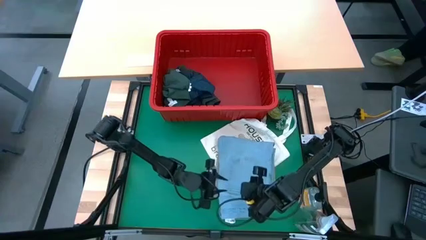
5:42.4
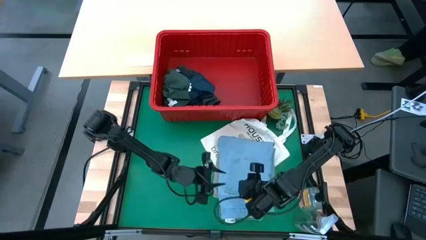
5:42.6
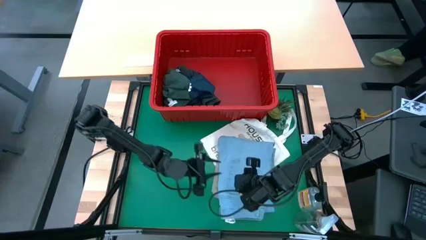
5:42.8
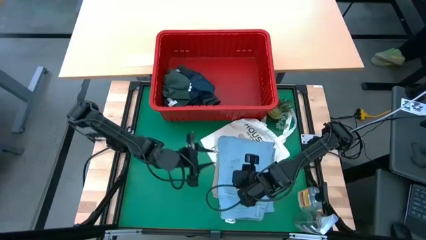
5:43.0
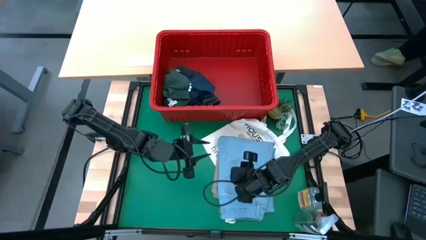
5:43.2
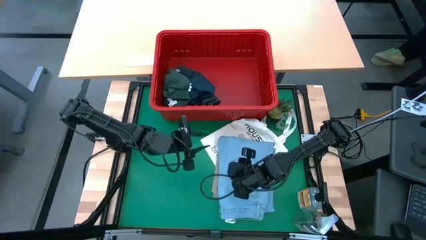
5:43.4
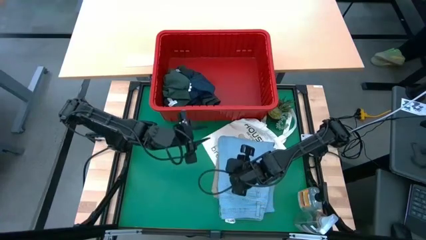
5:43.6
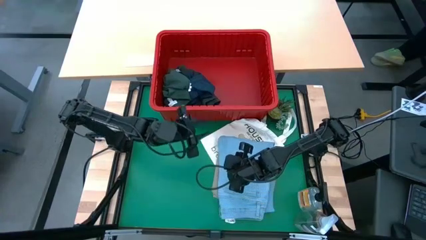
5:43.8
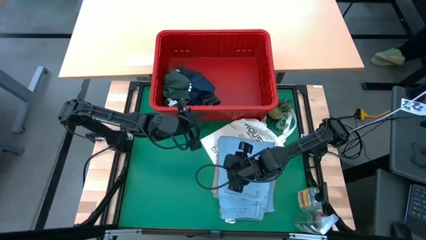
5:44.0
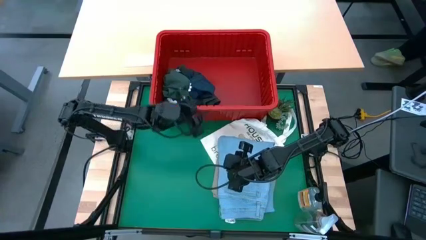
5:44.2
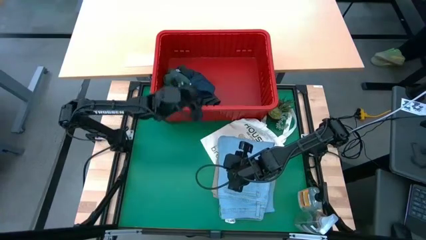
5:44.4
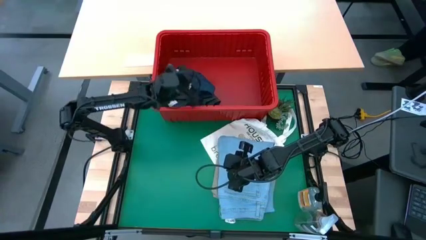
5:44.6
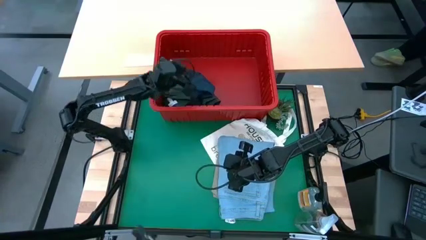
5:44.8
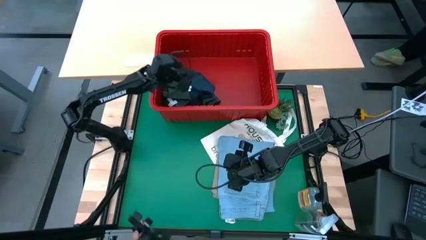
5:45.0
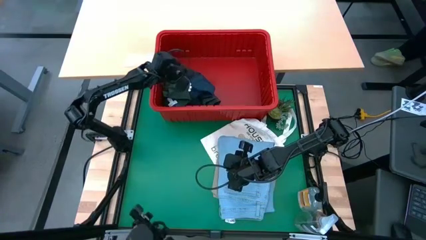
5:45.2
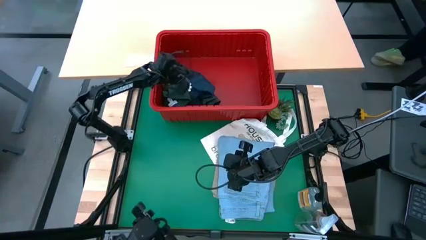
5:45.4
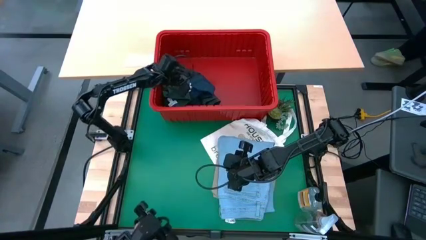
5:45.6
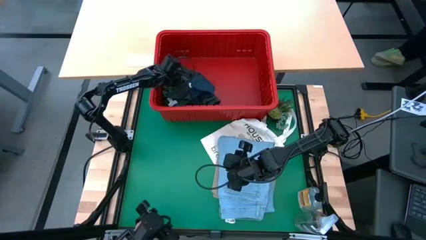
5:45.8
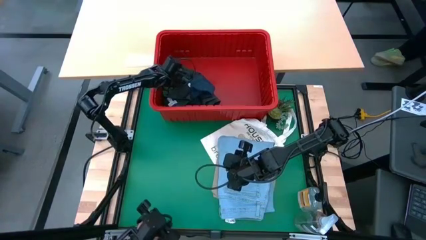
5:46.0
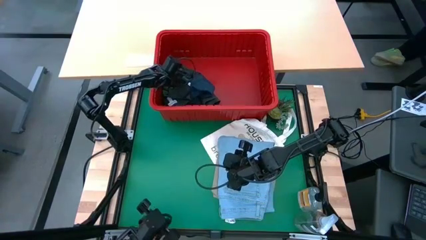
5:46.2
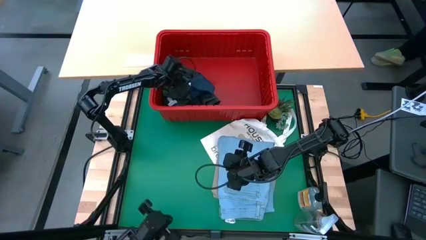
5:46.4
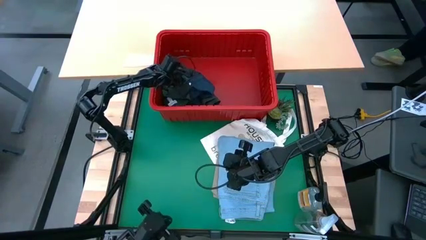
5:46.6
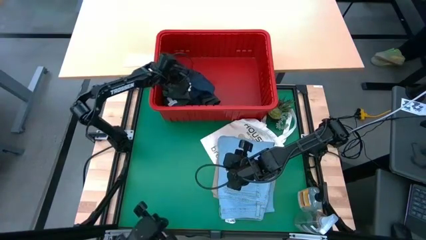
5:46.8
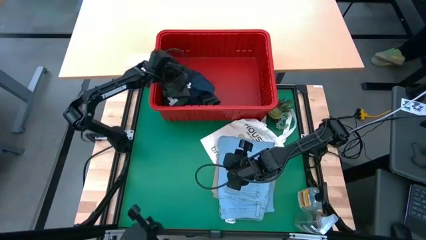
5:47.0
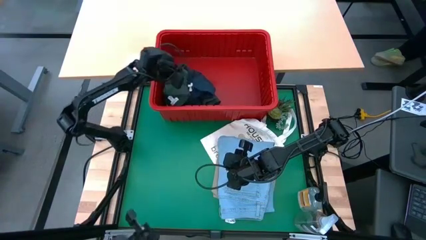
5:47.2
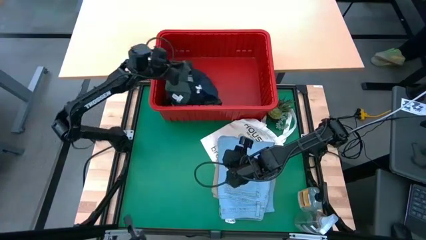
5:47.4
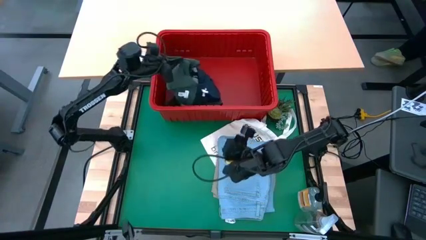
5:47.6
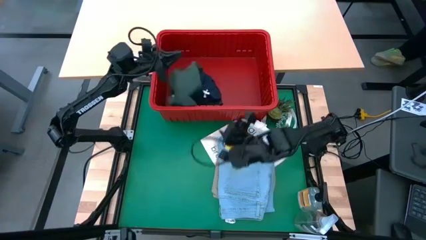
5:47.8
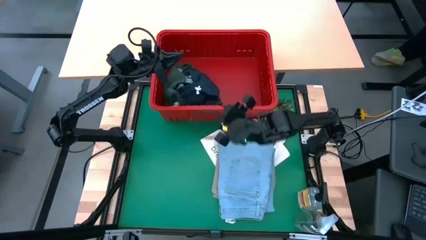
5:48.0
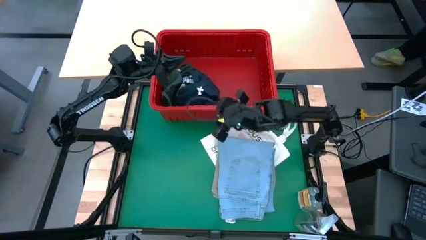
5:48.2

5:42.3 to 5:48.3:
Task: Fold Laundry from Bin
Fold the green polo shirt

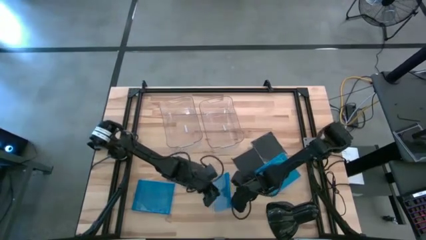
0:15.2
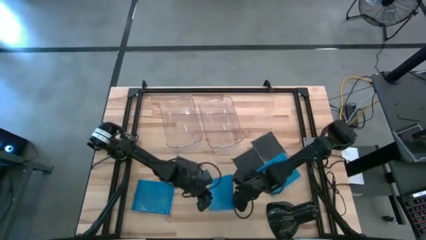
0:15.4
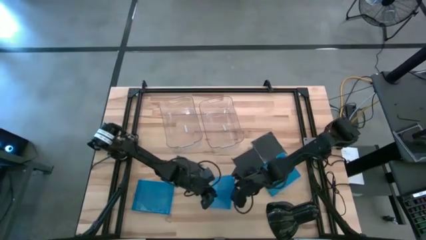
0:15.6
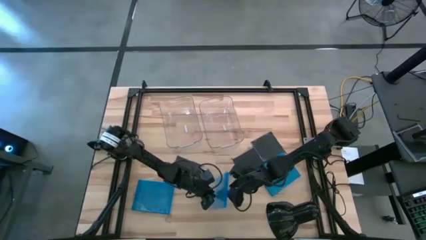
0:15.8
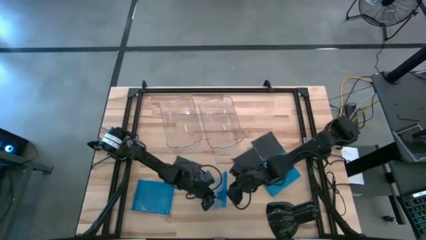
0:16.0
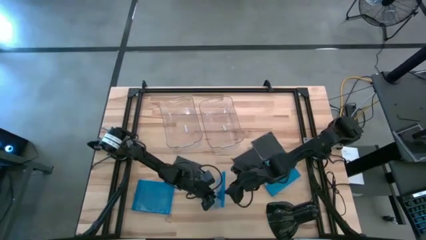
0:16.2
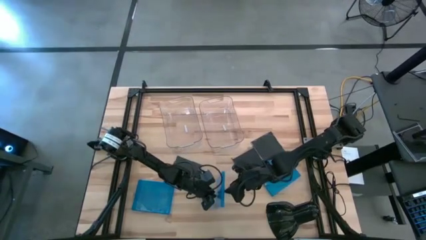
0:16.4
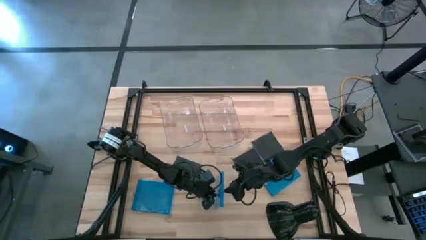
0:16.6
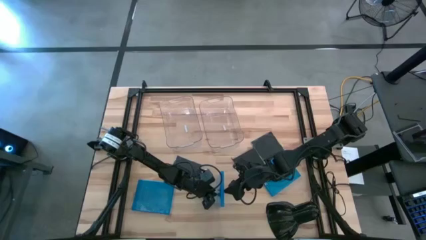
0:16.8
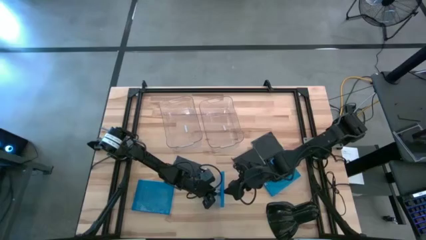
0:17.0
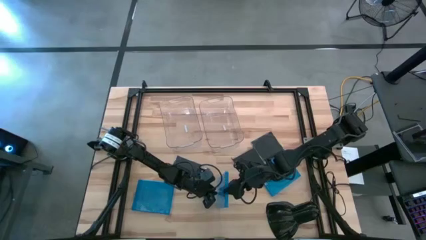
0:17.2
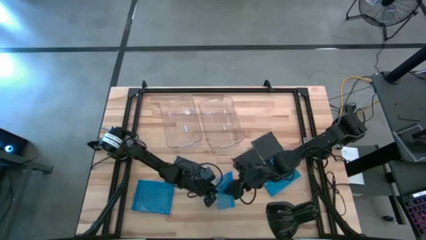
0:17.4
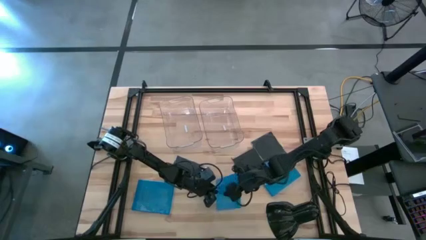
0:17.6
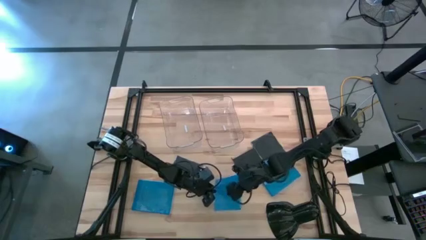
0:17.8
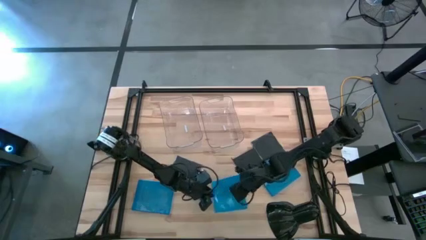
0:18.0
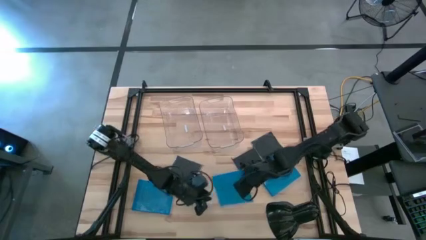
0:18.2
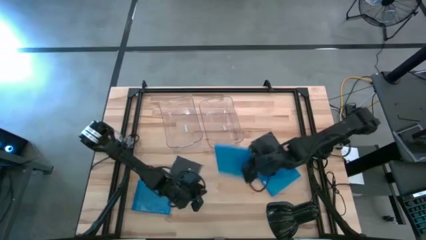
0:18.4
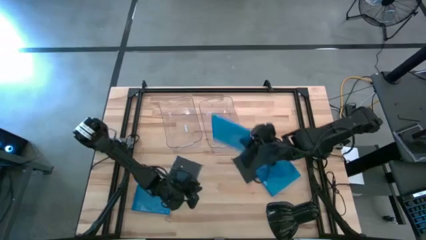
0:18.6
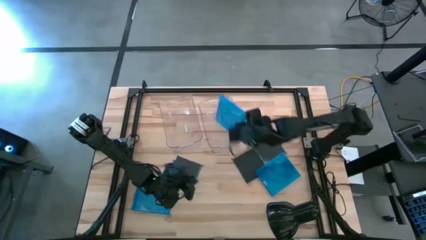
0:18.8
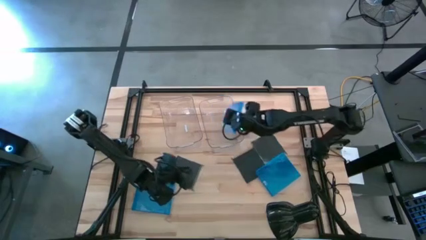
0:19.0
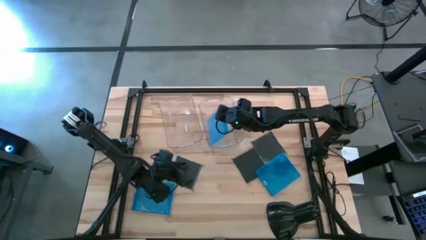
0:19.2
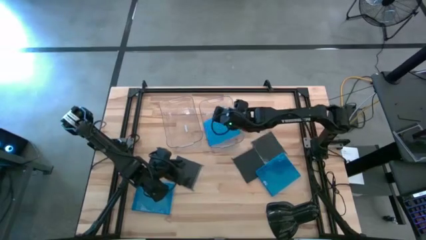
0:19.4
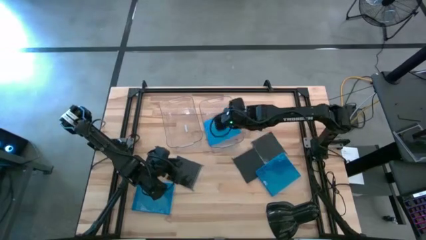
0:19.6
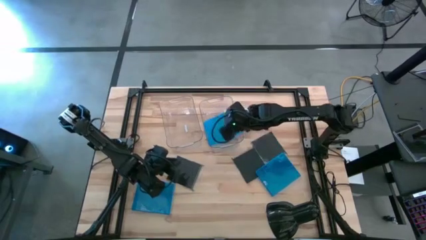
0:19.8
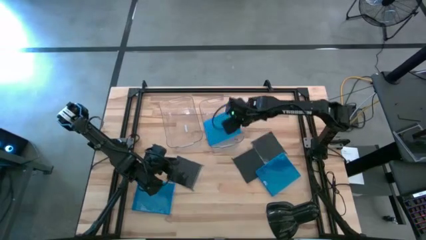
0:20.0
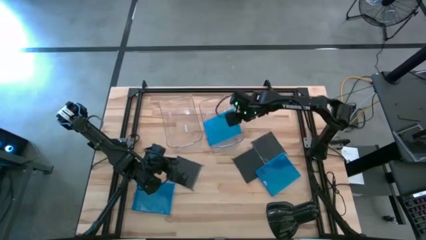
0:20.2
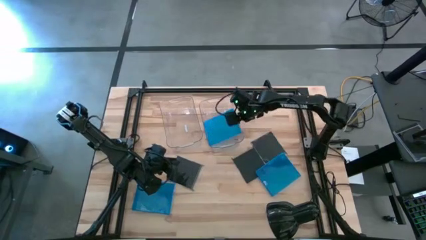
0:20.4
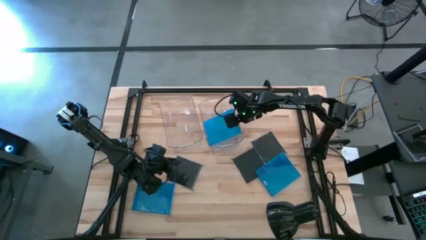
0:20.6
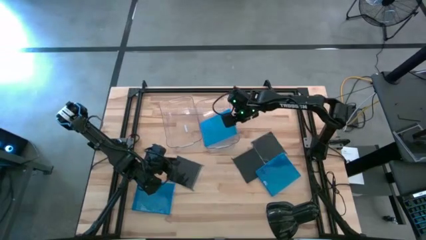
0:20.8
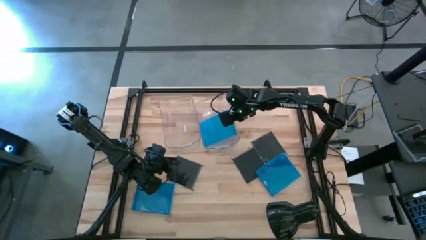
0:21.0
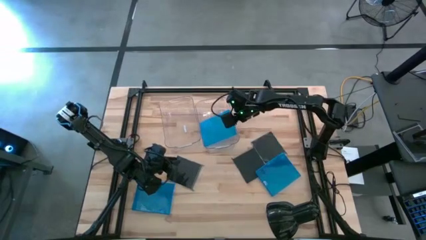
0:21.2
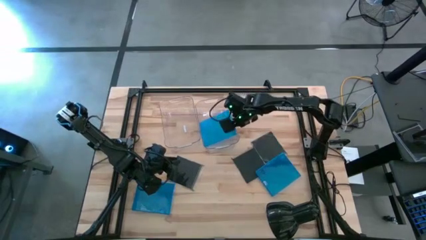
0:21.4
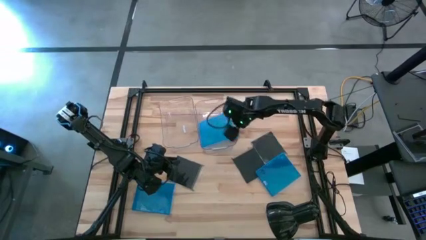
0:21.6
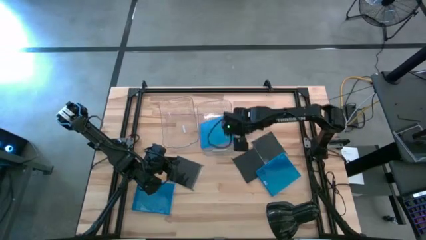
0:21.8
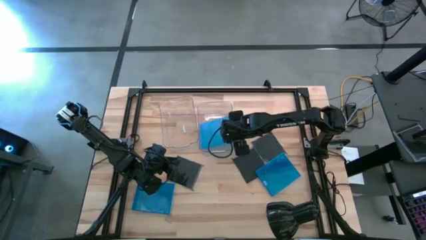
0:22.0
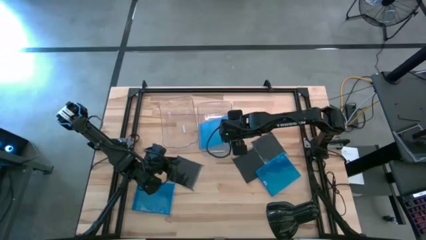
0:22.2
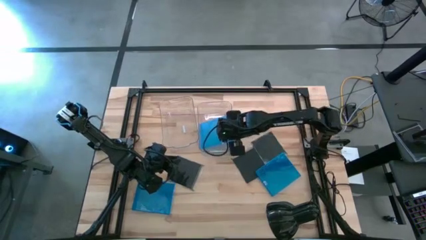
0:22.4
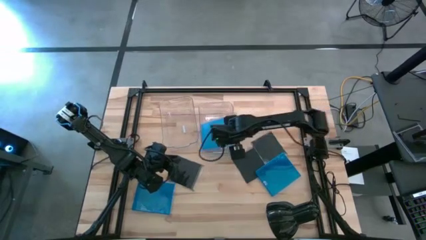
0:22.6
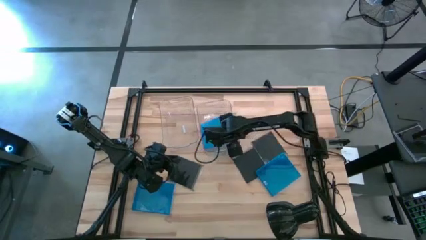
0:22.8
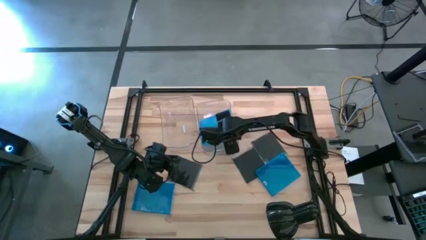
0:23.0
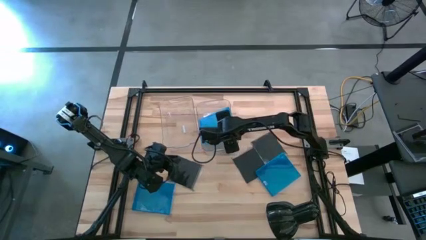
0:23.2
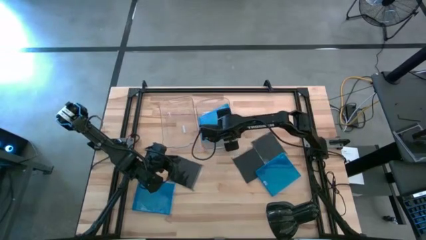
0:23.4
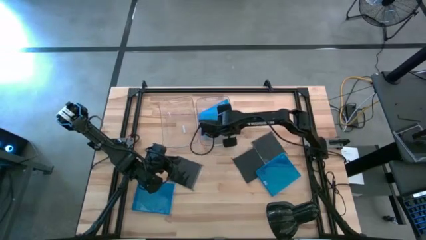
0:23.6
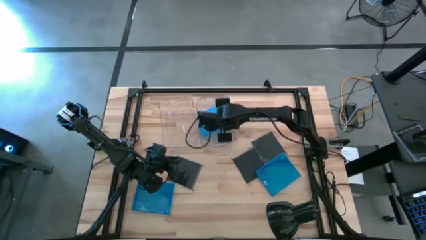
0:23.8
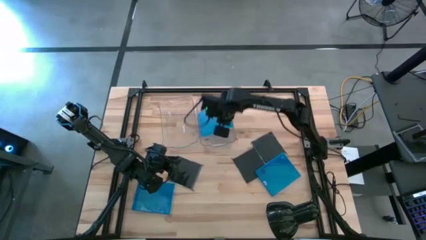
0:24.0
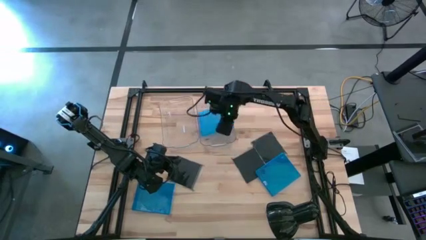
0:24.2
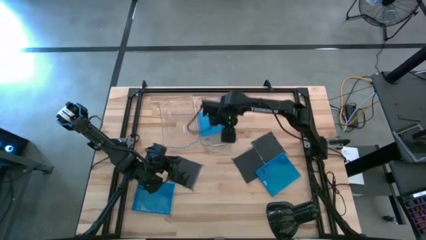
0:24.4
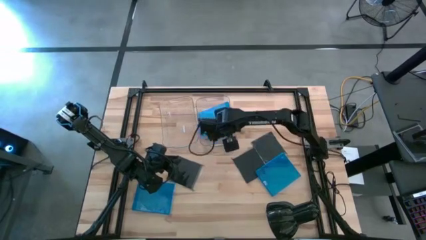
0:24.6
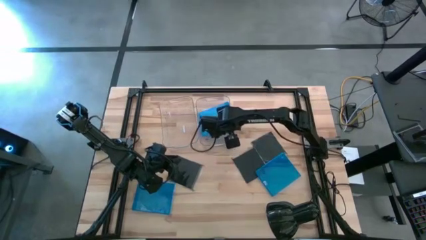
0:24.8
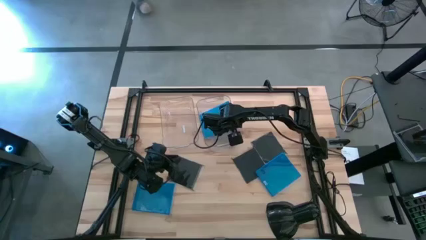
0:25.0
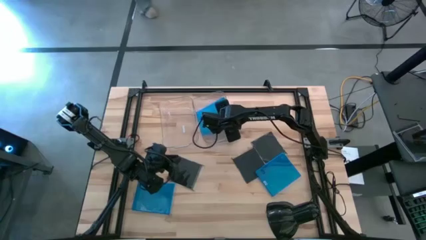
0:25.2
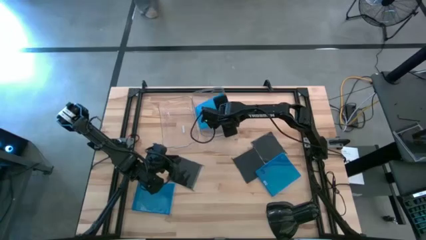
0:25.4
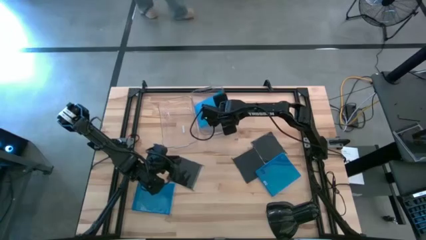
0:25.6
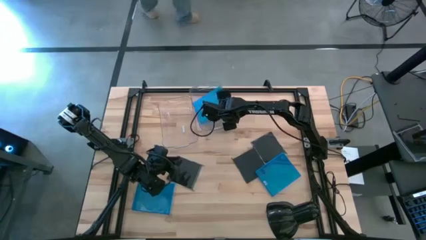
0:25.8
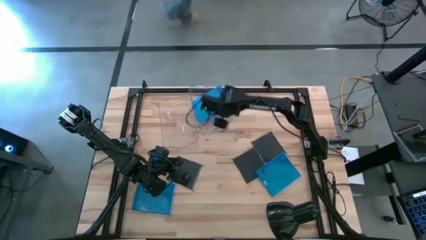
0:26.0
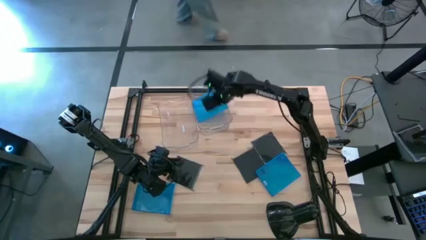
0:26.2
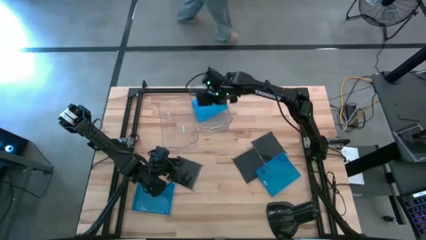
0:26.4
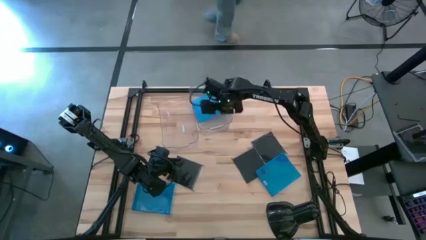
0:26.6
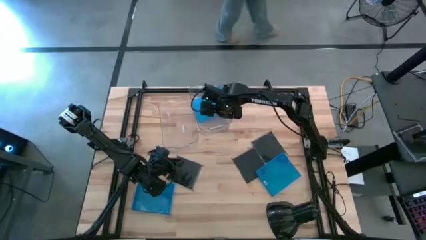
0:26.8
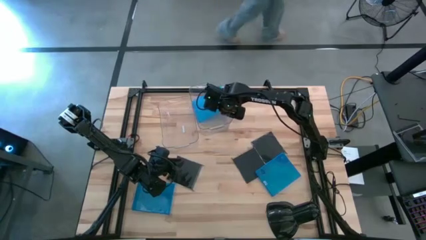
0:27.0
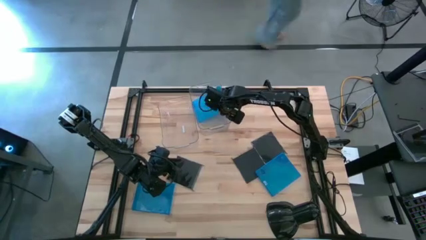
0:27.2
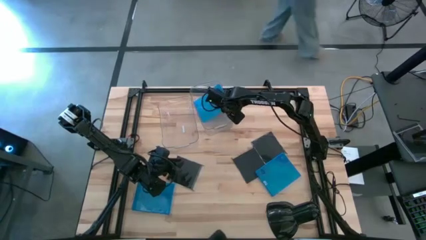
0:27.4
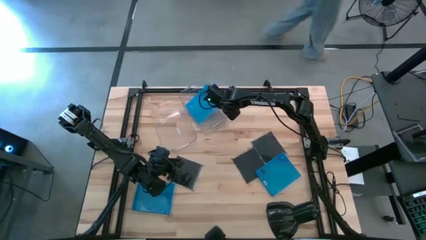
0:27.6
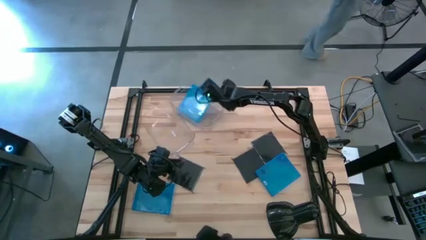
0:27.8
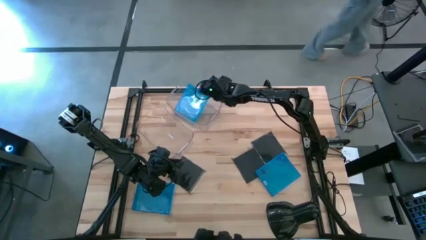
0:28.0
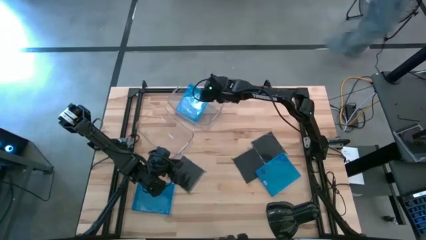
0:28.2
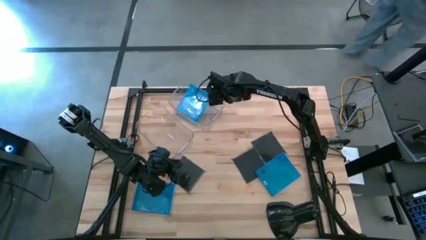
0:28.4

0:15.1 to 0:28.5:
Task: Pick & place jewel cases by type
Put the middle blue CD case into the right transparent bin
